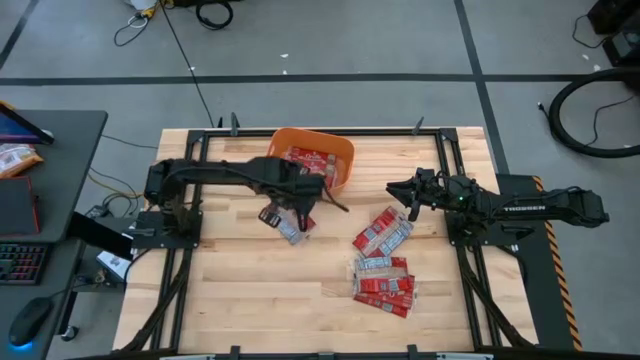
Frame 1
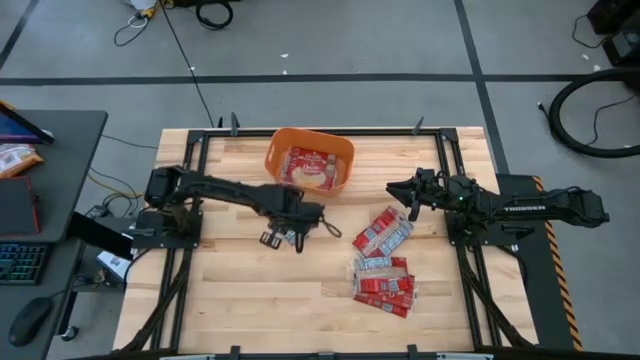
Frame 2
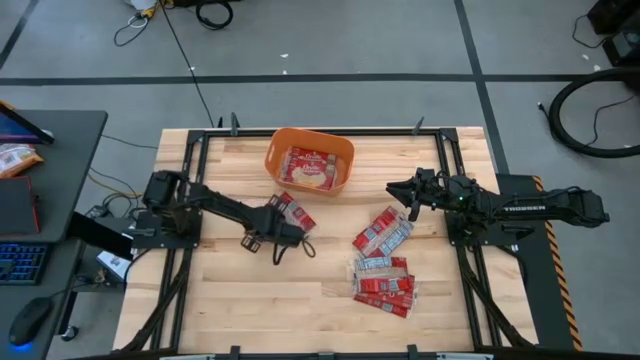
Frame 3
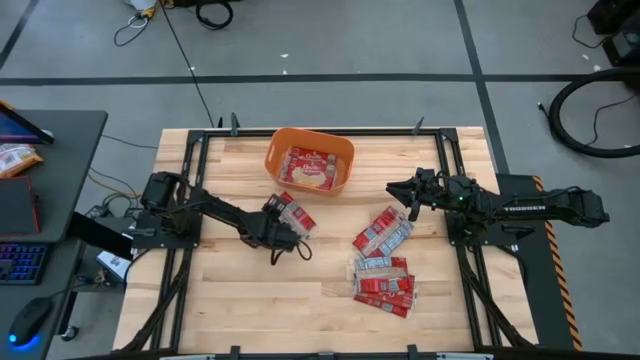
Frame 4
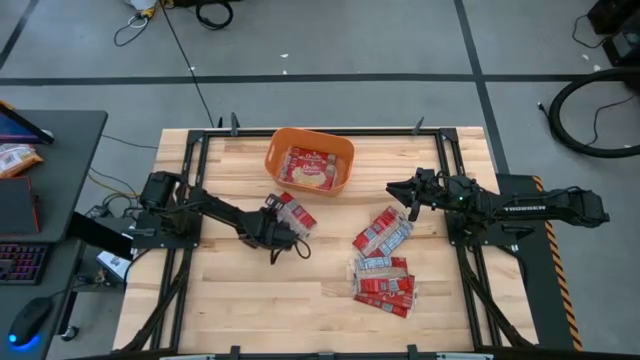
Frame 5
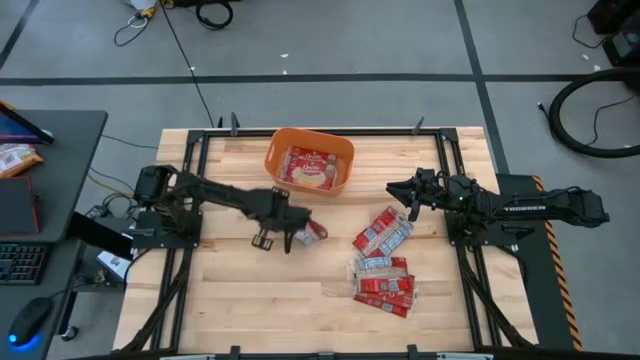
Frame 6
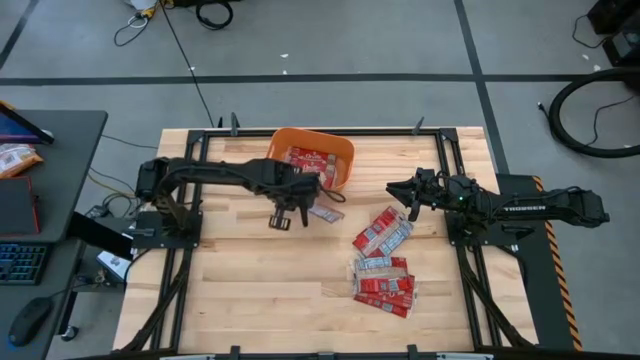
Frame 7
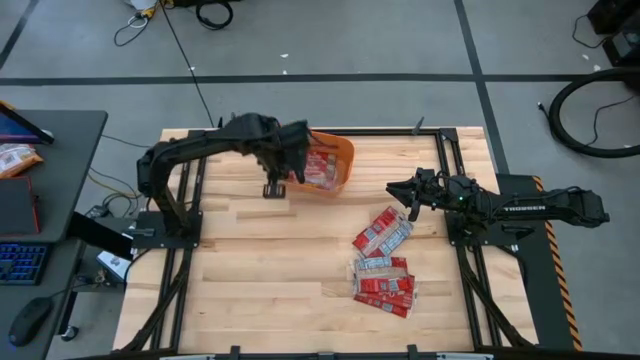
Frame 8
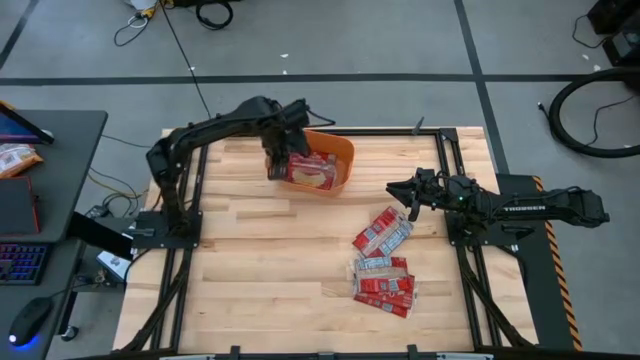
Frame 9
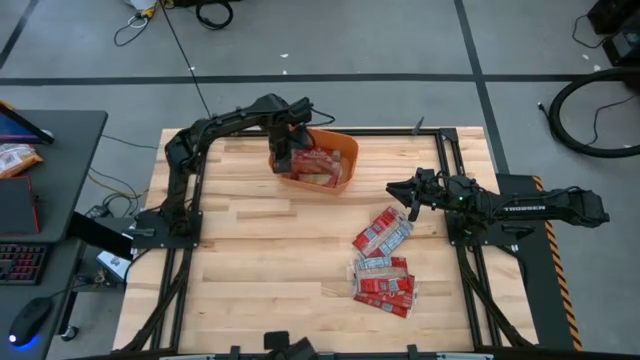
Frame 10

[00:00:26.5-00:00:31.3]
Task: Sort popcorn bags into baskets
Put the red popcorn bag into the orange bin

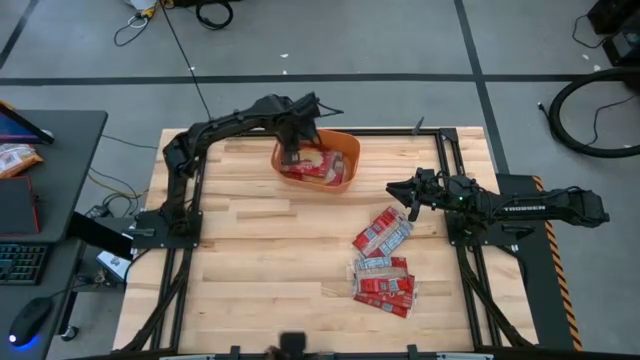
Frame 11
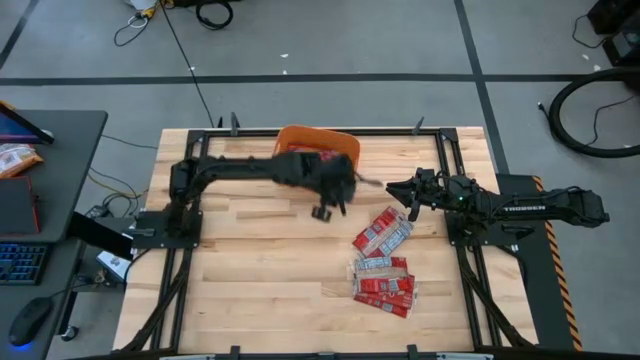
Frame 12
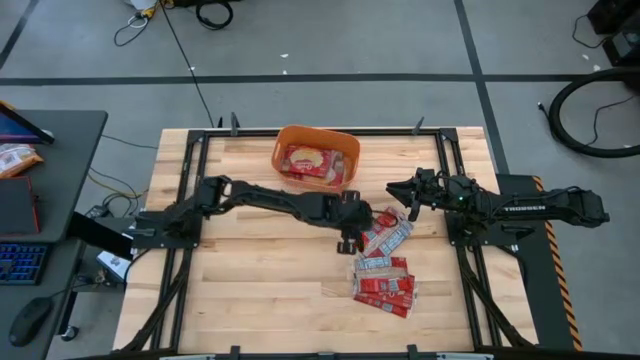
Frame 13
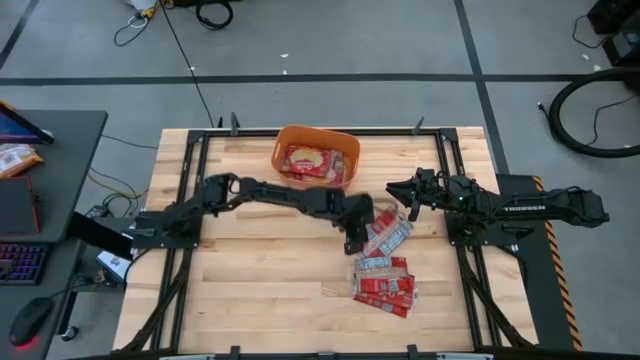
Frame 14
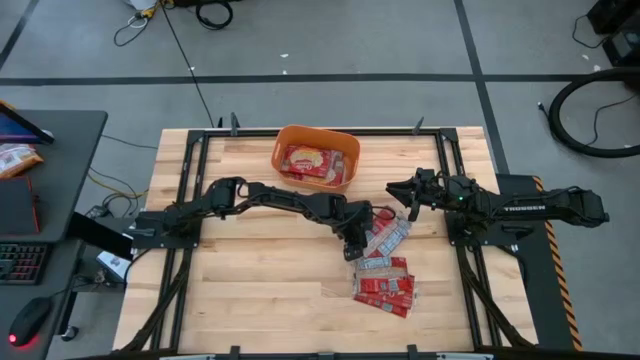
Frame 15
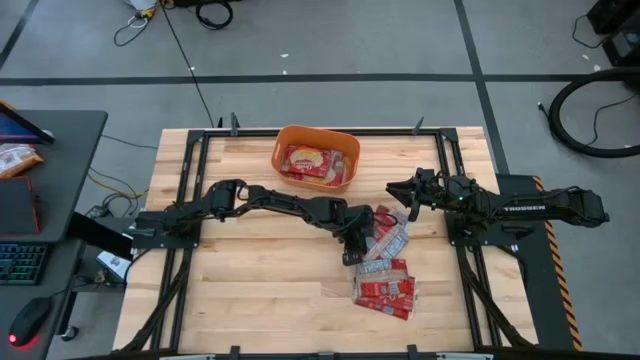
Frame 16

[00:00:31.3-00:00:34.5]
Put the red popcorn bag into the orange bin

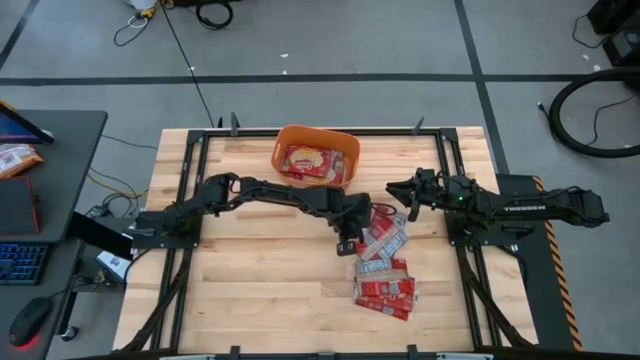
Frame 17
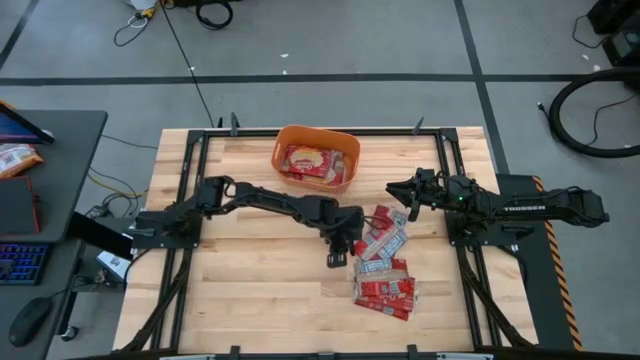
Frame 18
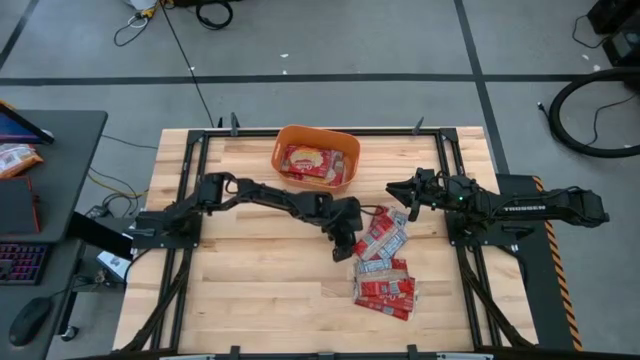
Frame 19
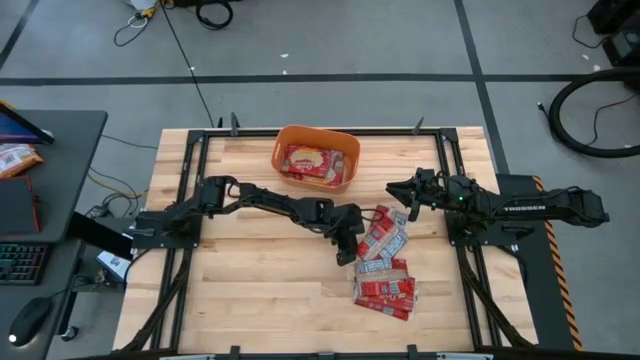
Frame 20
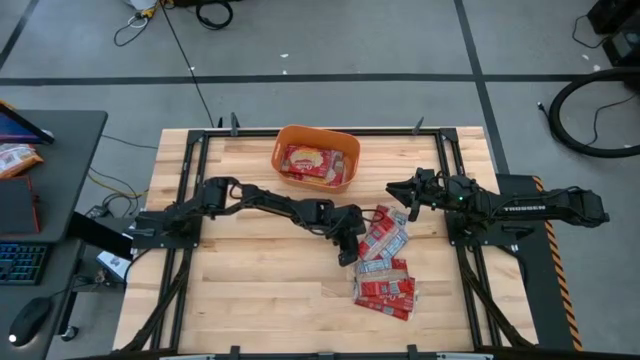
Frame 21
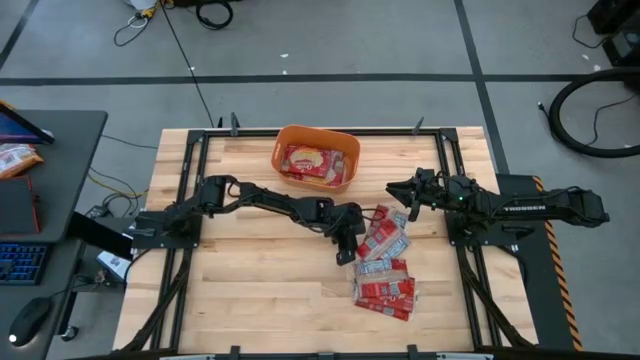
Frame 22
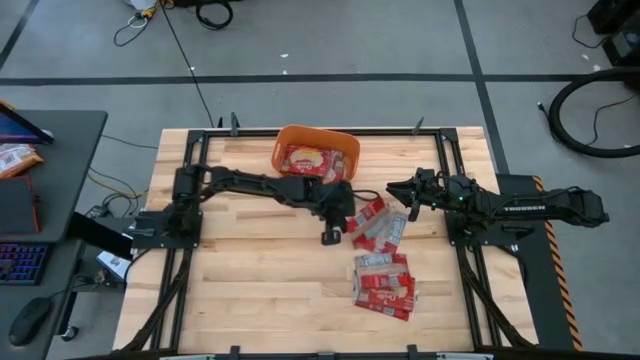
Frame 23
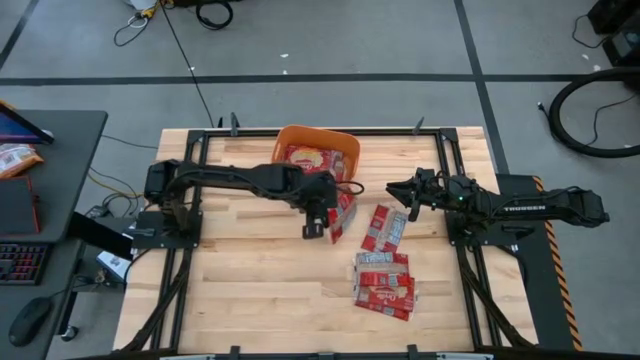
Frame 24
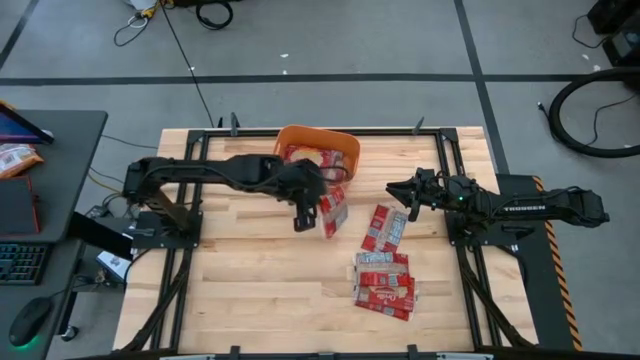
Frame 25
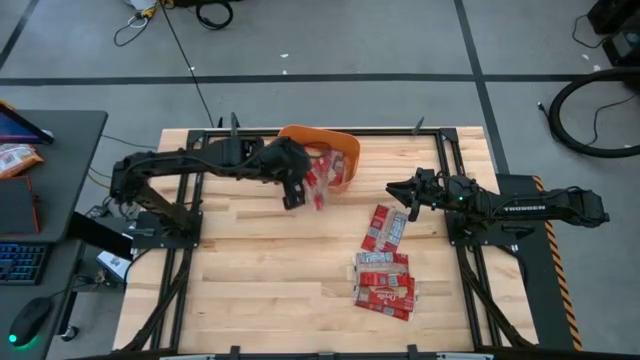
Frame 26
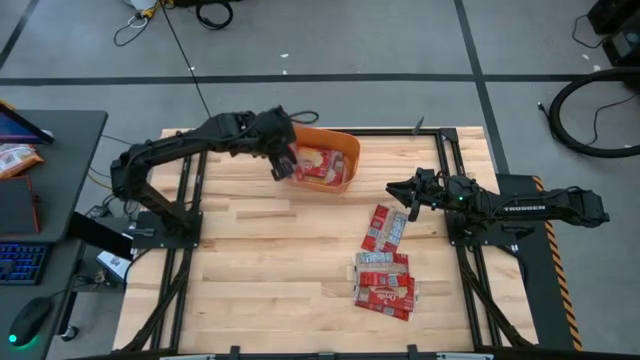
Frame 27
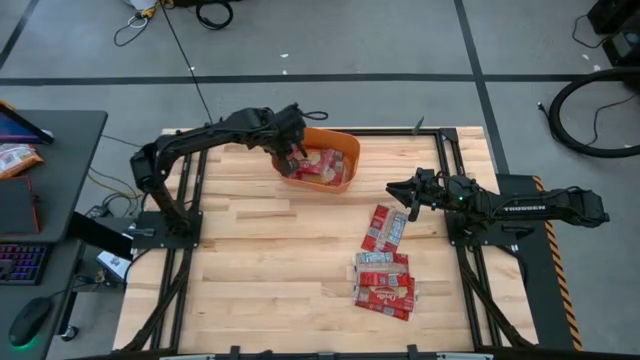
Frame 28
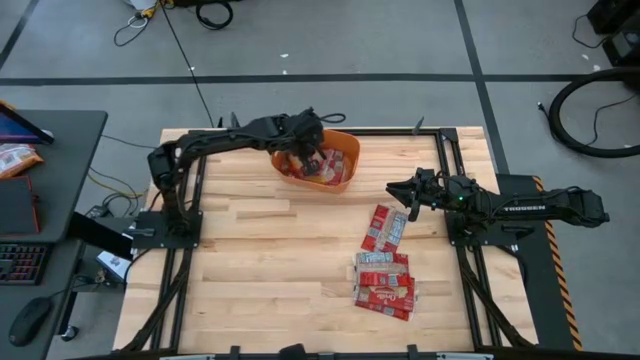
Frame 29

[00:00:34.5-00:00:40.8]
Put the red popcorn bag into the orange bin

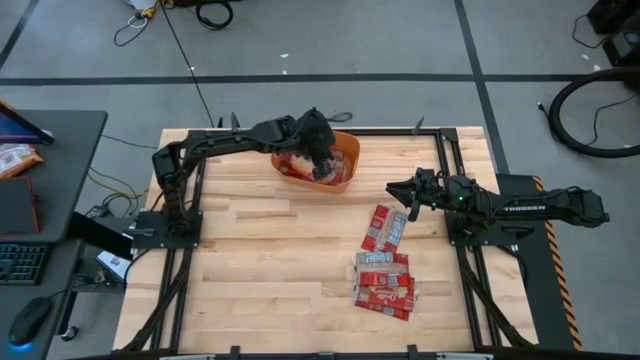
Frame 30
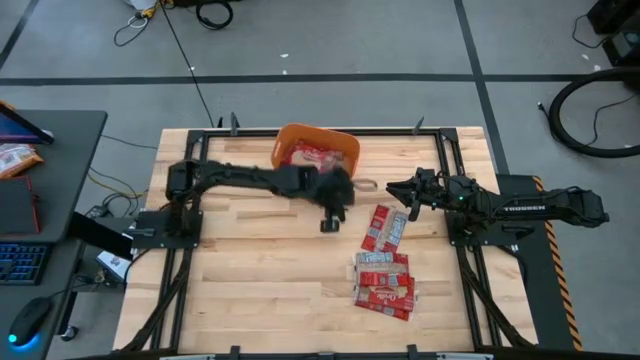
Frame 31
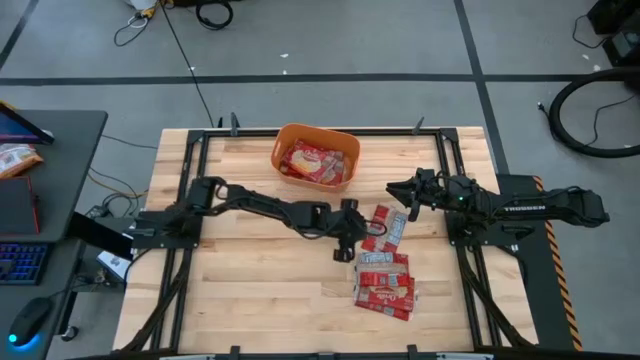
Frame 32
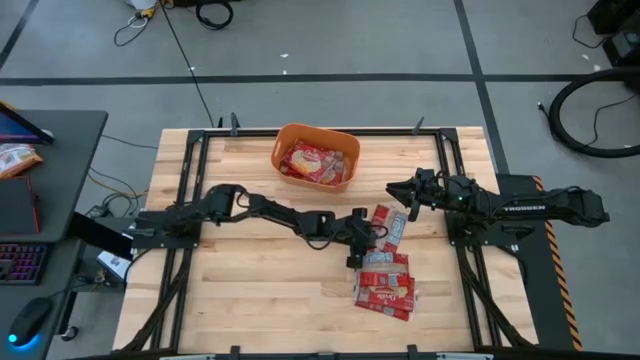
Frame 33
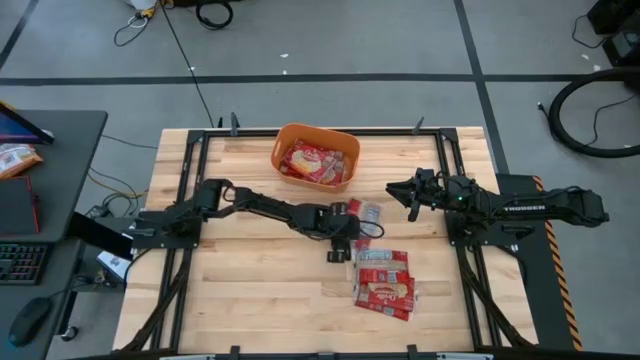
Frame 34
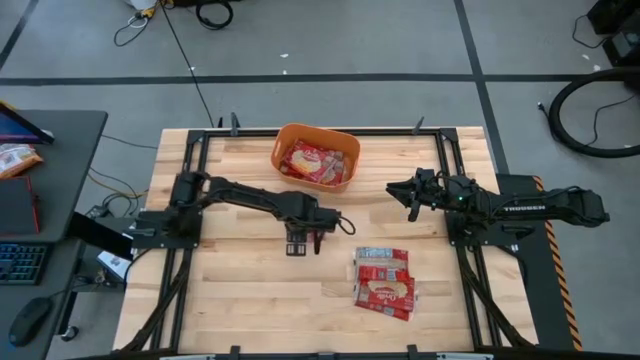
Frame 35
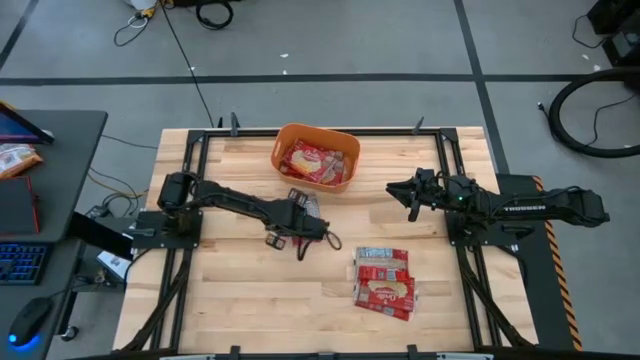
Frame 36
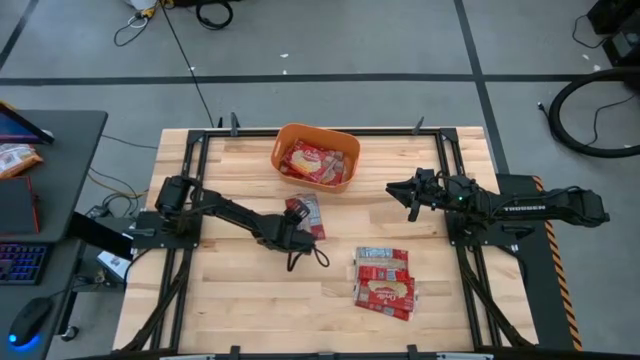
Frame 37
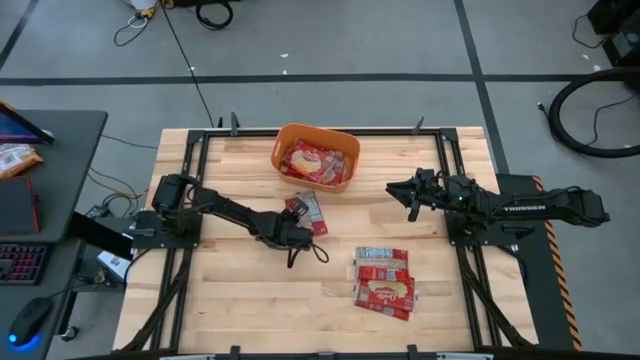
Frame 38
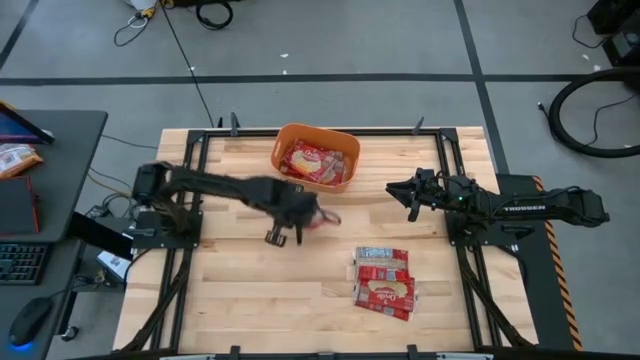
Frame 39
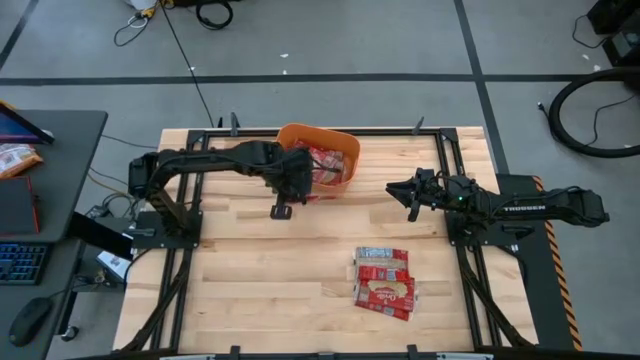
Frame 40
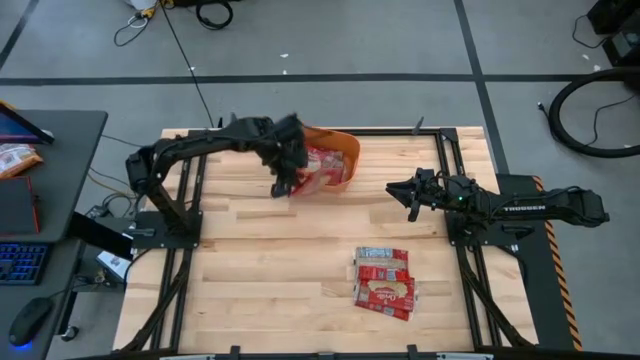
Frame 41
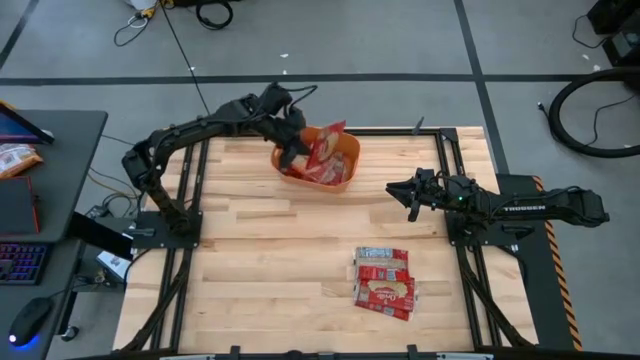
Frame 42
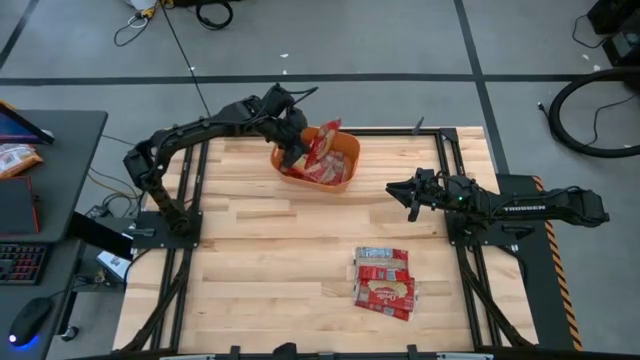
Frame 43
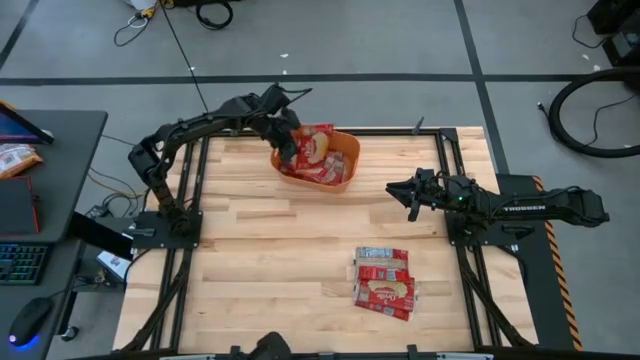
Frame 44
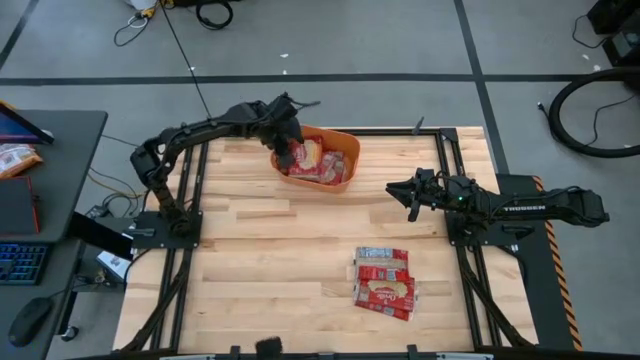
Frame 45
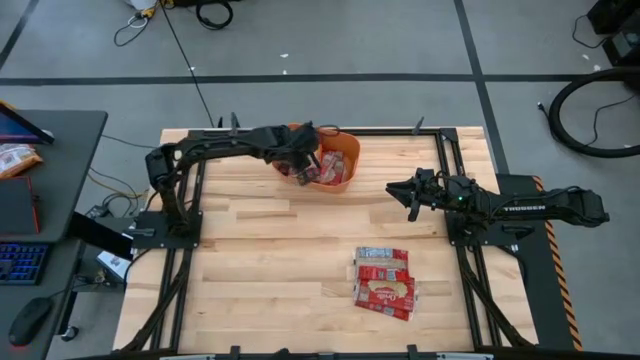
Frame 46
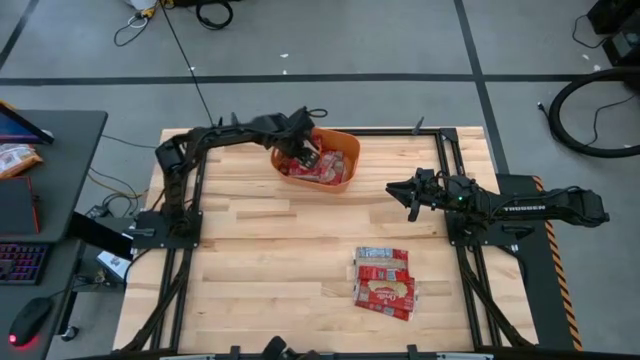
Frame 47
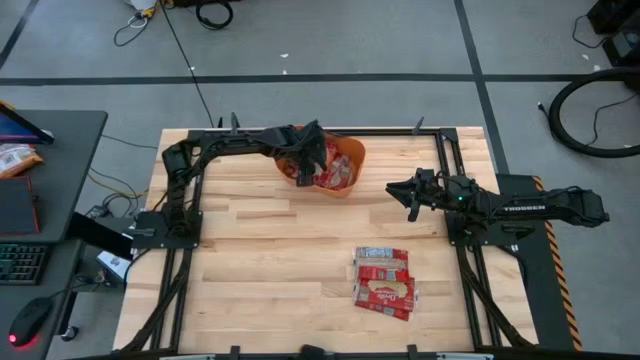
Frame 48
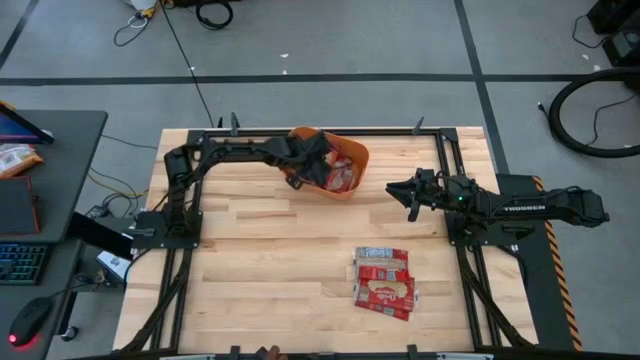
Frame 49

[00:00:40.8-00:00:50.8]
Put the red popcorn bag into the orange bin
